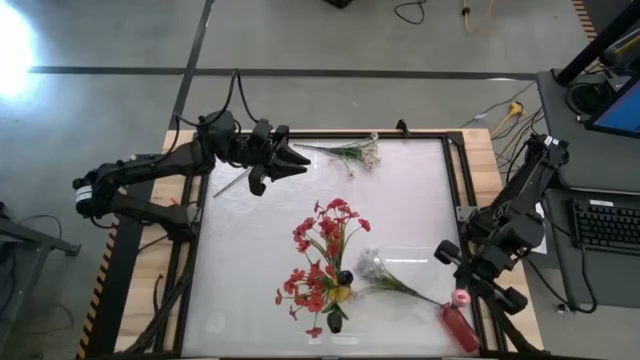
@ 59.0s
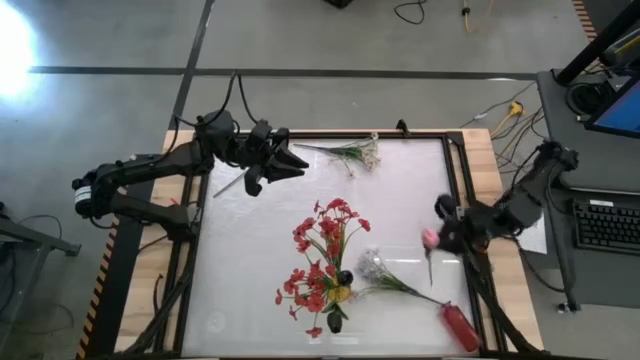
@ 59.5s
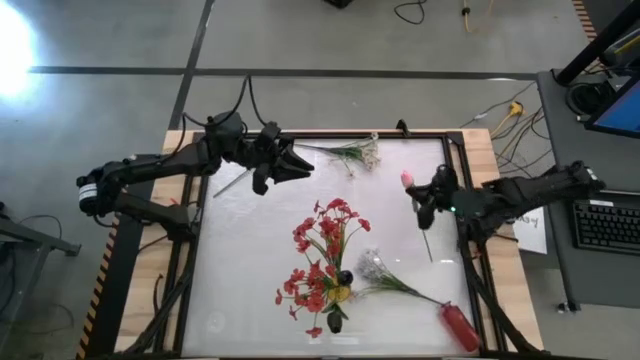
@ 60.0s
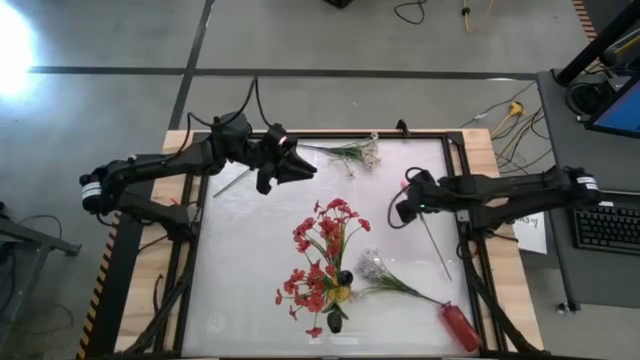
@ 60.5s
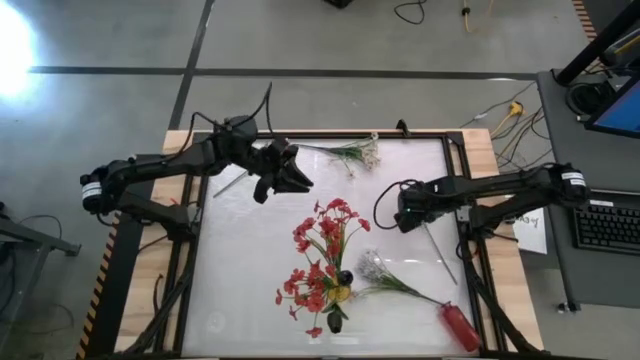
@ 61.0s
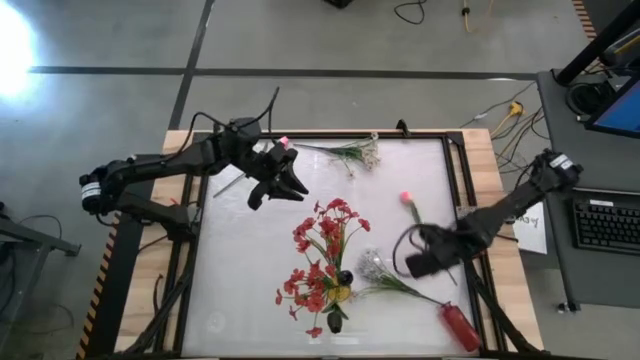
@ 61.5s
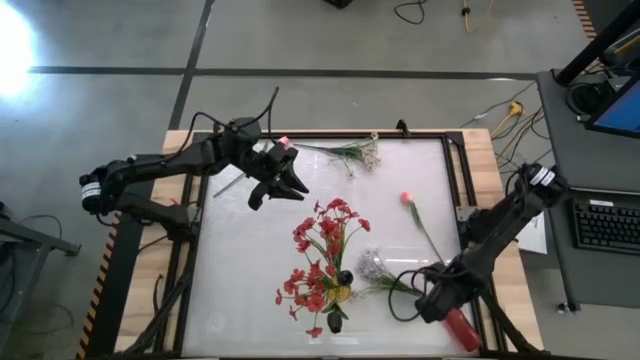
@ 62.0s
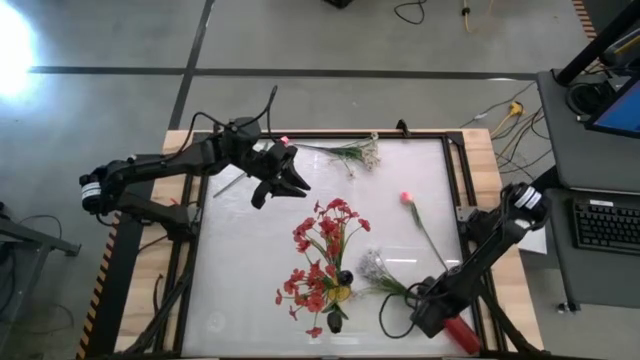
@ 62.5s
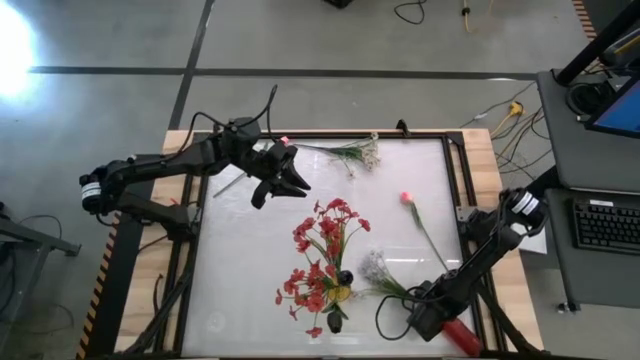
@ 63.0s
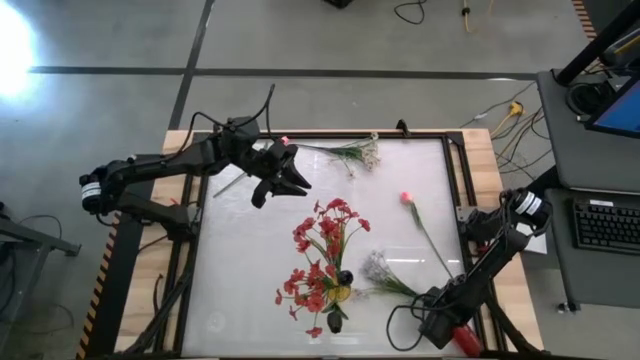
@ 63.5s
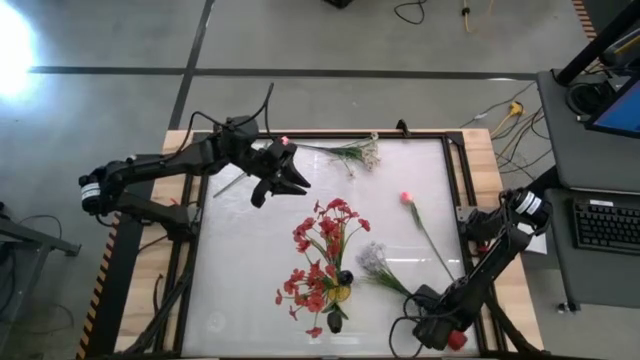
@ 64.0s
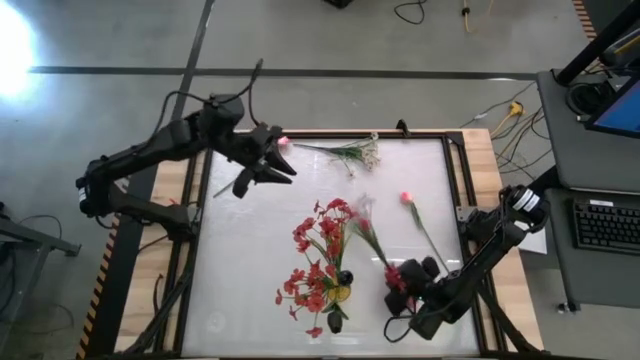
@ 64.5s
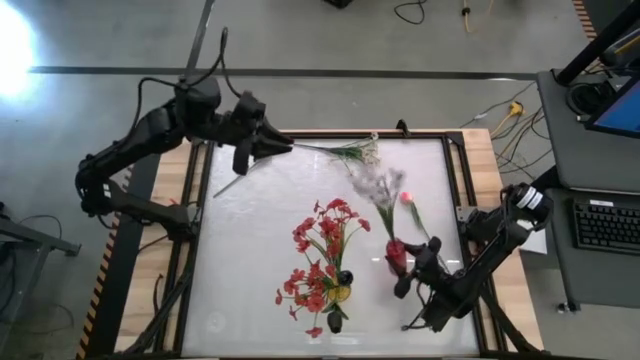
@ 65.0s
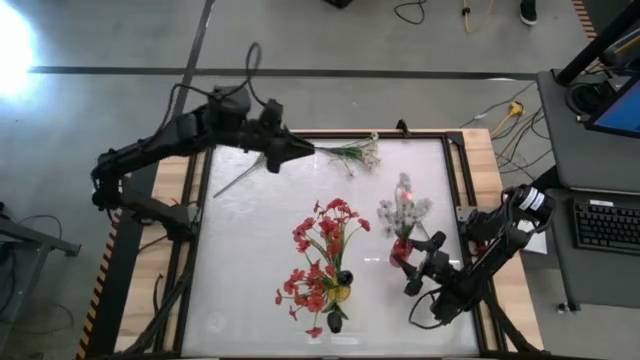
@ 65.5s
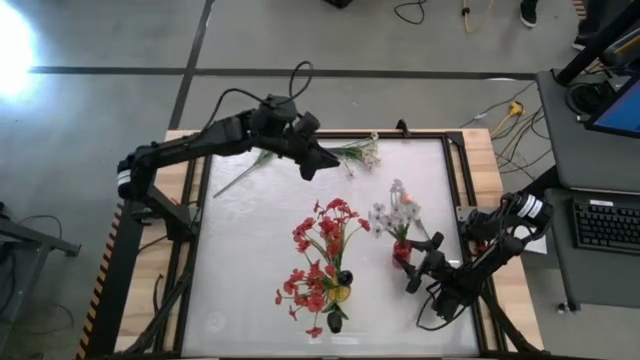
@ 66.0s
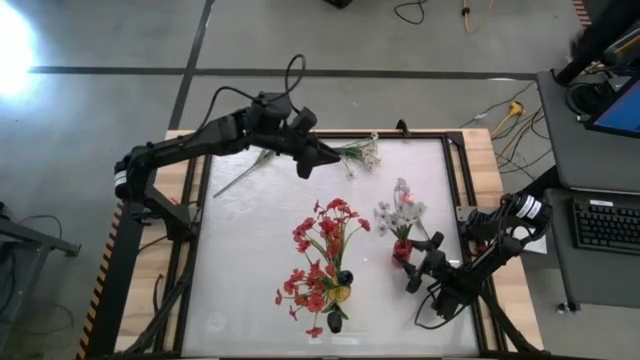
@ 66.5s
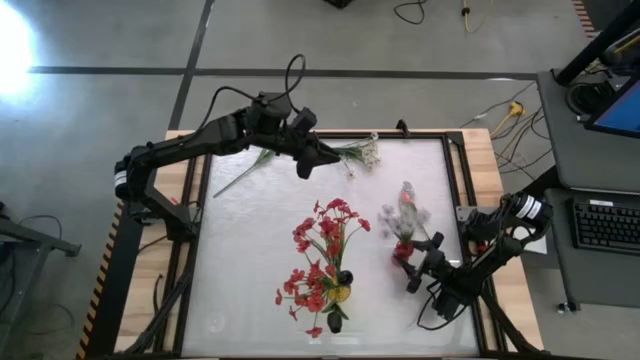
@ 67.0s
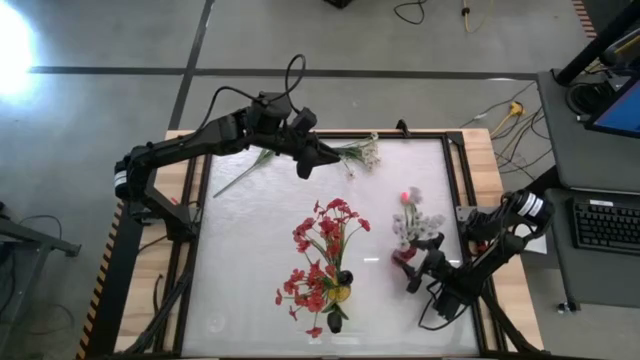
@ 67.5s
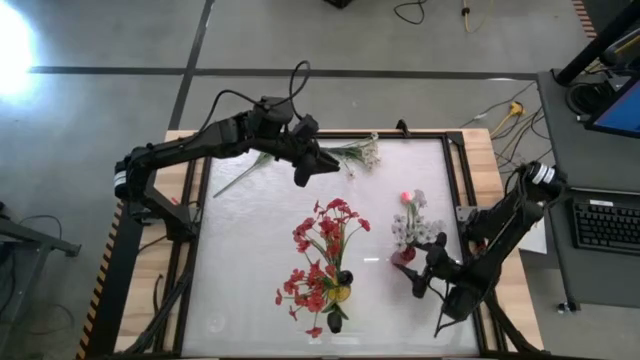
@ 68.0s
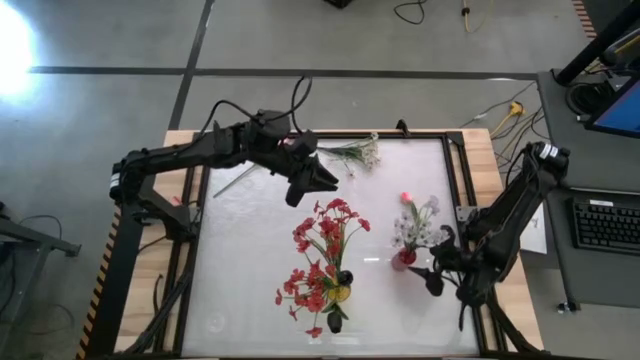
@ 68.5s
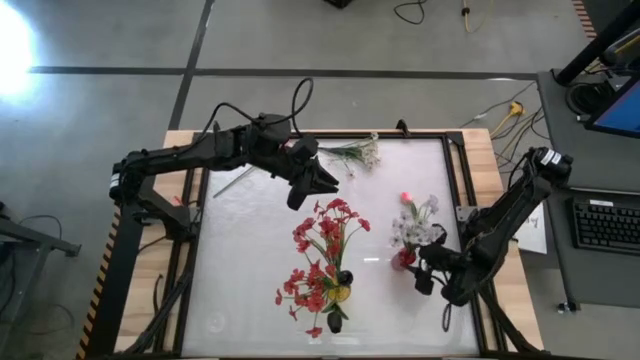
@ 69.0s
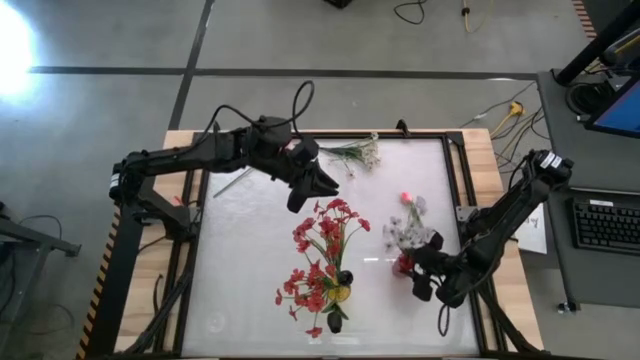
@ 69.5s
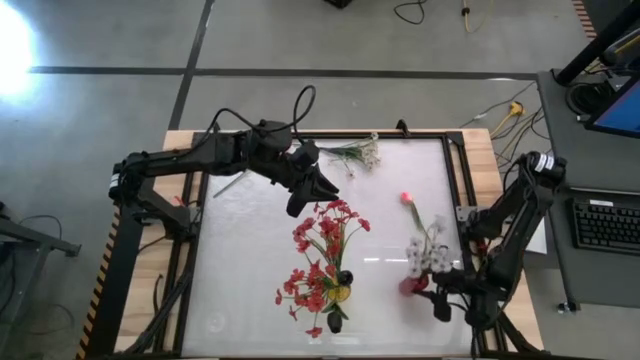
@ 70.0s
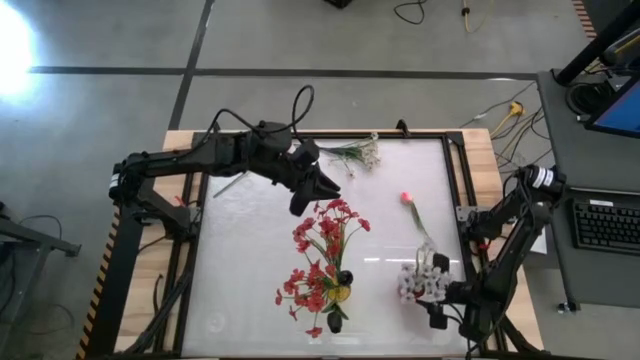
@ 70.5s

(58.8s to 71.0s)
Task: Sort flowers into vase by color
Adjust the red vase

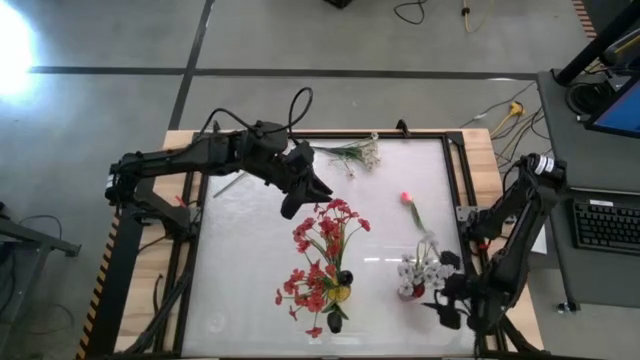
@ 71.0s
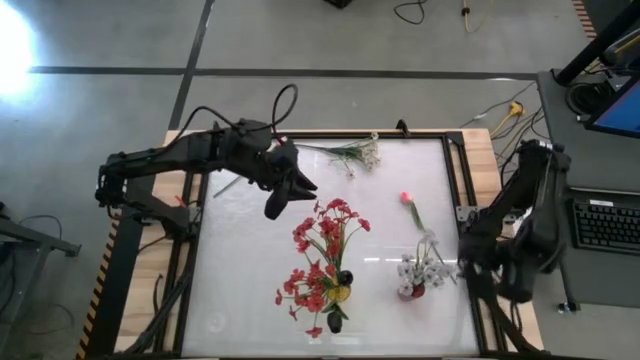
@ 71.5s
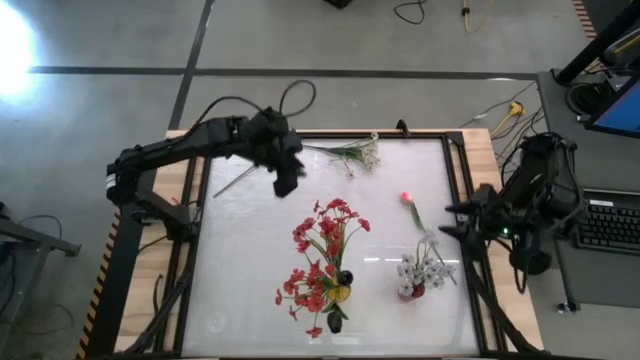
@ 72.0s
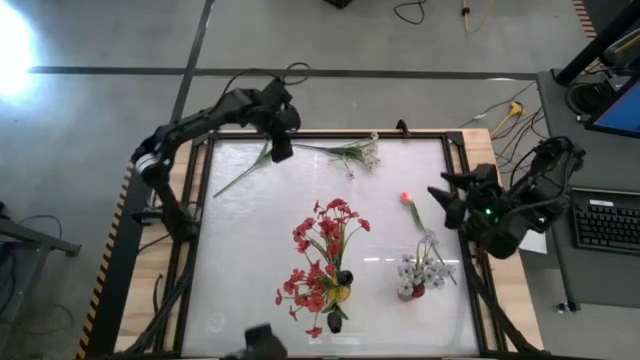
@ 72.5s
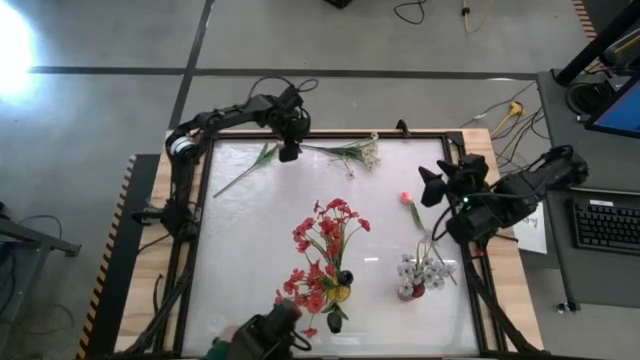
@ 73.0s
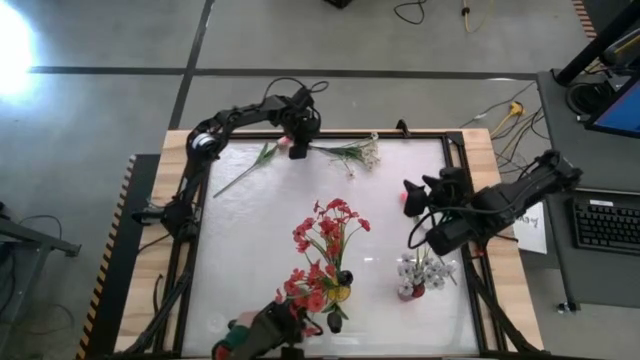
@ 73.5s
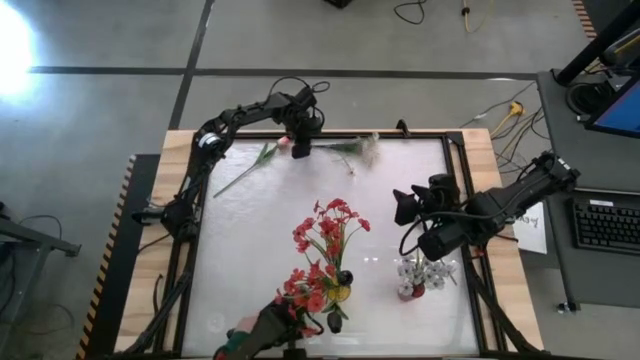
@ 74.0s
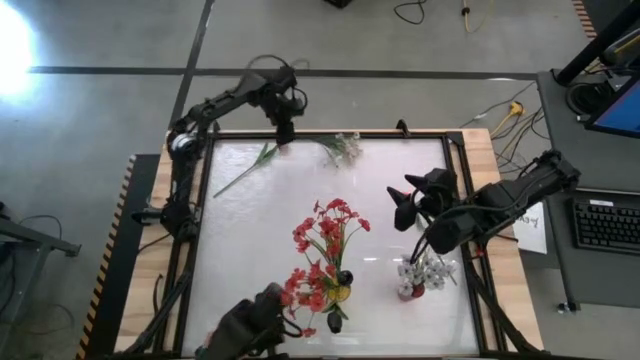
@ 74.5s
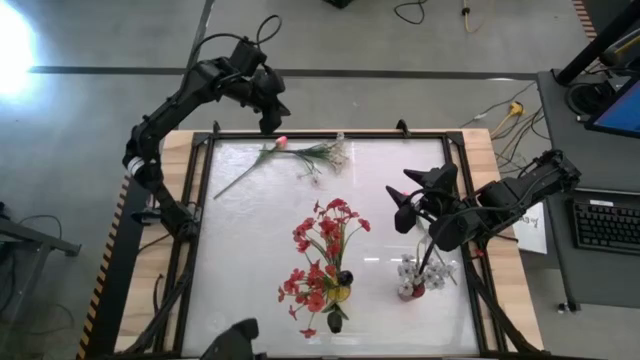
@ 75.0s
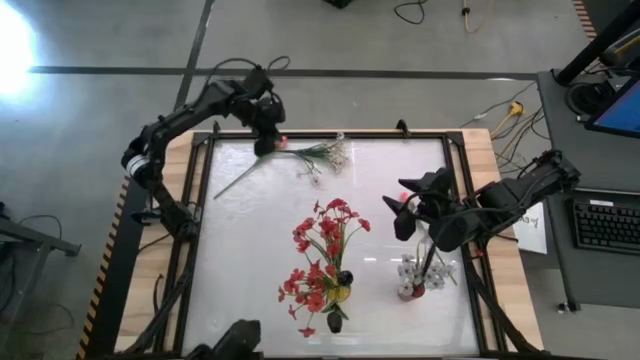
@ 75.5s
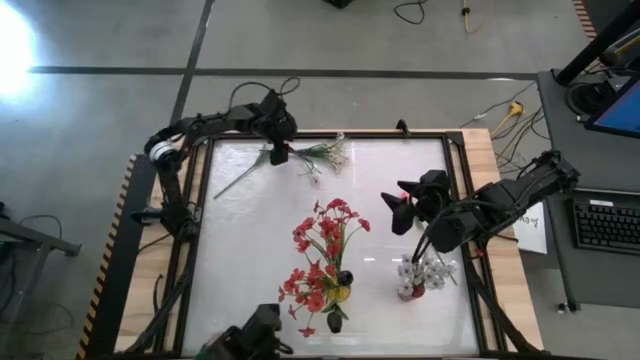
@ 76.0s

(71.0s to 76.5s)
Put the white flowers into the red vase

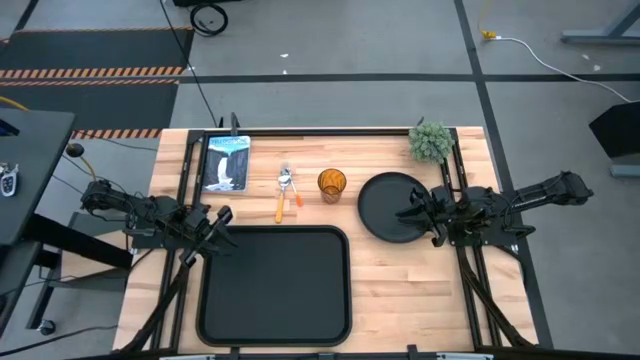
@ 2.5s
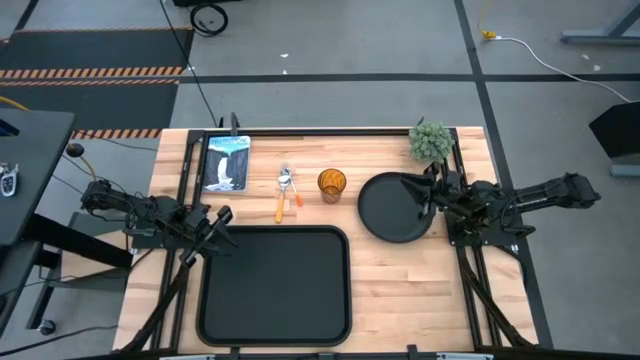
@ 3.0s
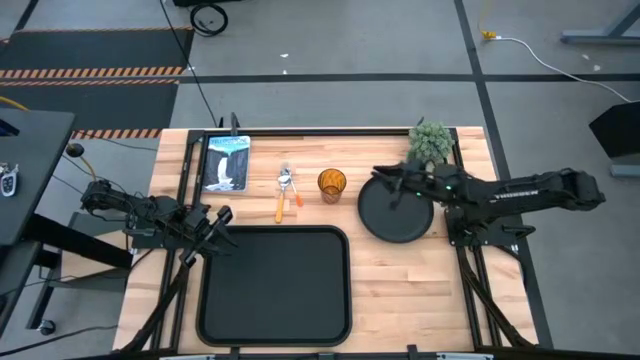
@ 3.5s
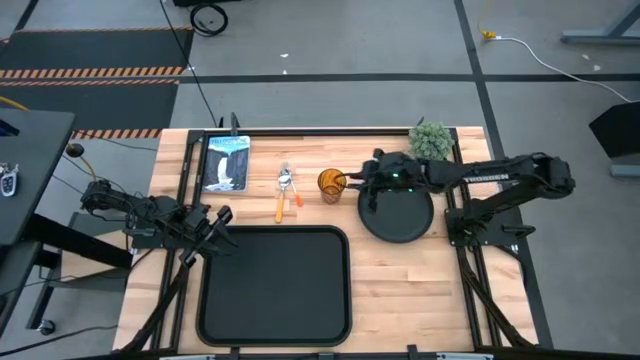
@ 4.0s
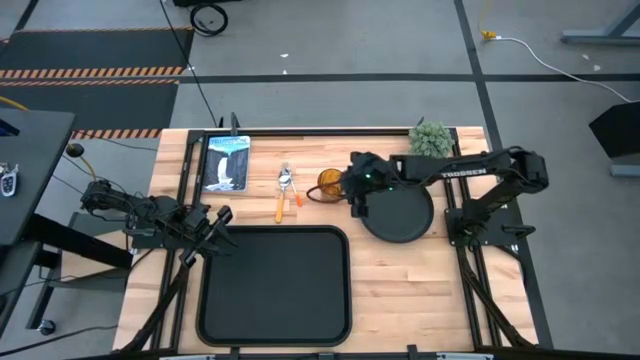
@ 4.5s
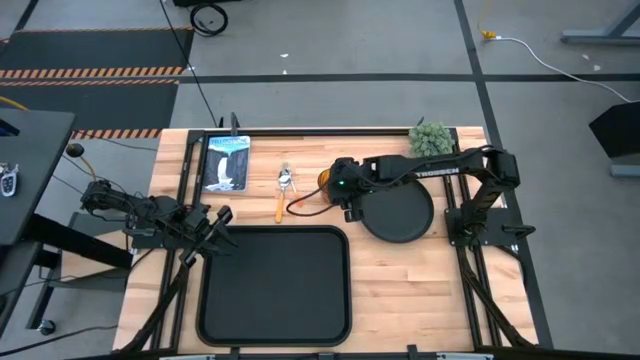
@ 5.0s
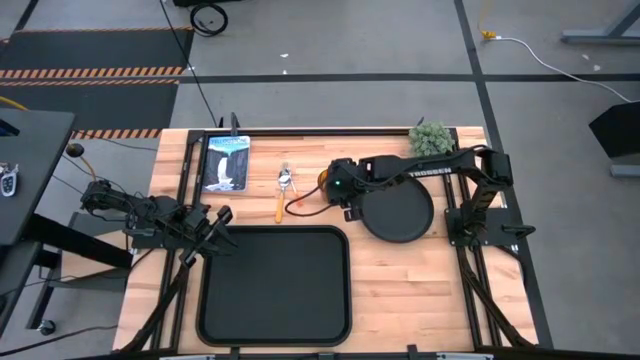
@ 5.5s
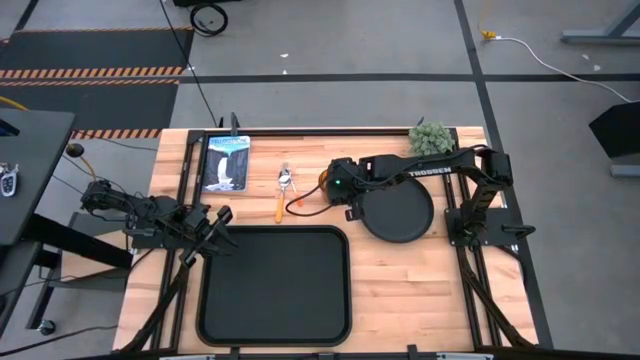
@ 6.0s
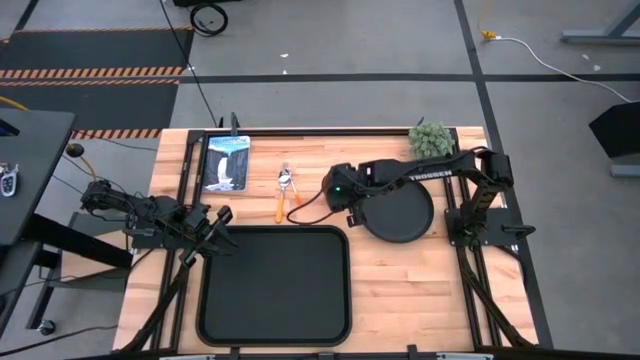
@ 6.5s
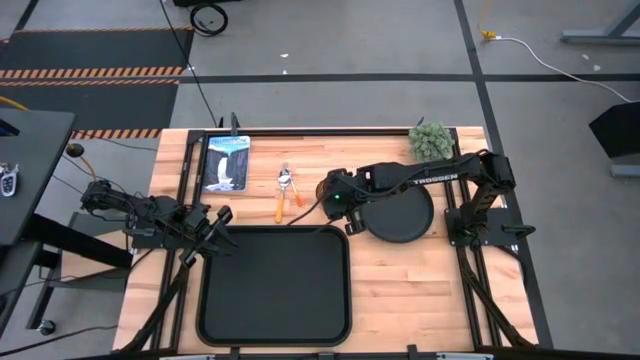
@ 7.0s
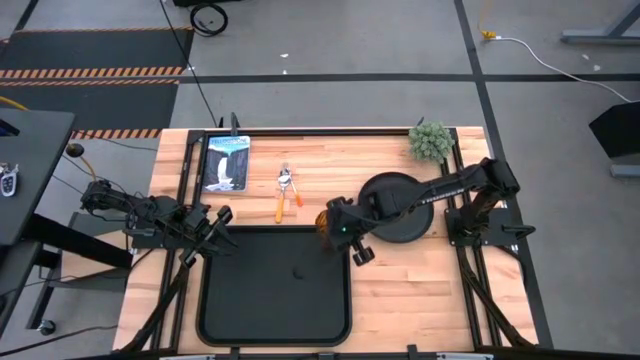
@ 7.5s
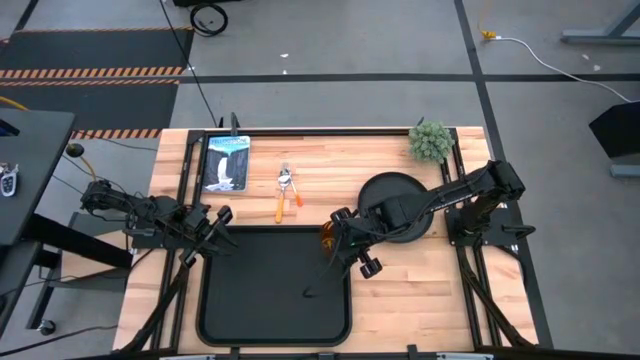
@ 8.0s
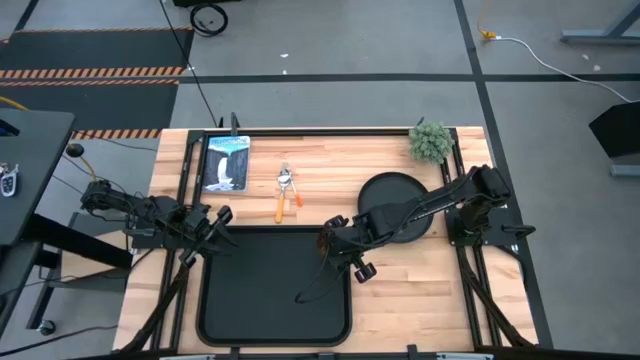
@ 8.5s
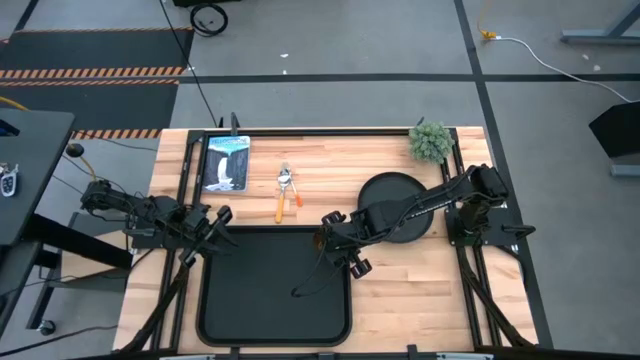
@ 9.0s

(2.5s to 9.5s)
Task: Pick and place plate/cup/fork/spoon on tray
Put the orange cup on the top right of the black serving tray
